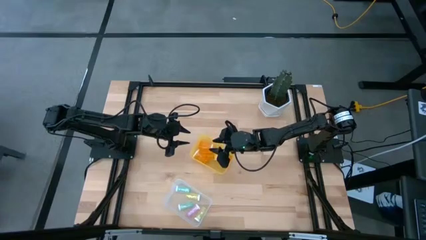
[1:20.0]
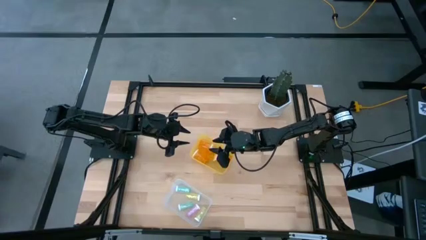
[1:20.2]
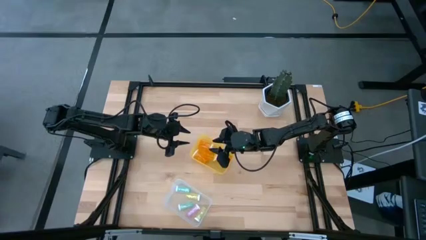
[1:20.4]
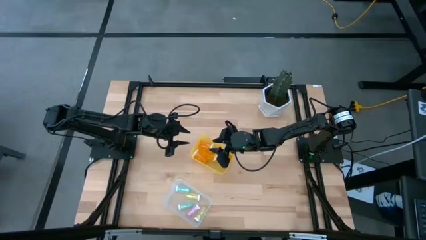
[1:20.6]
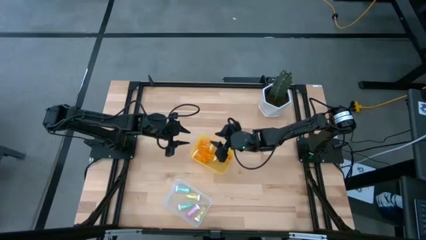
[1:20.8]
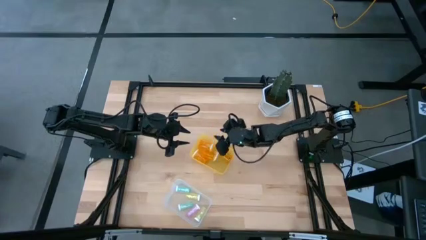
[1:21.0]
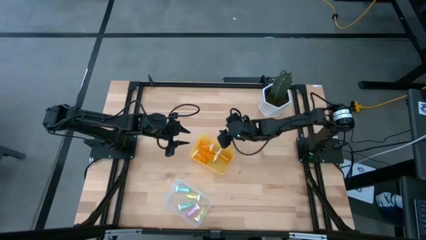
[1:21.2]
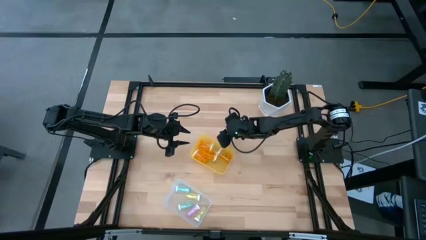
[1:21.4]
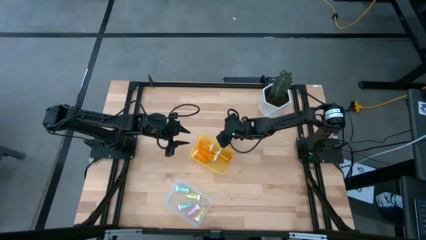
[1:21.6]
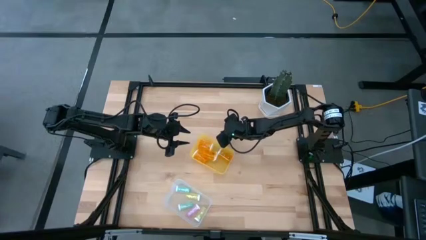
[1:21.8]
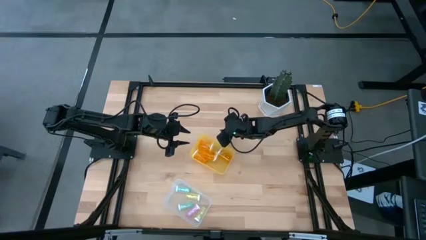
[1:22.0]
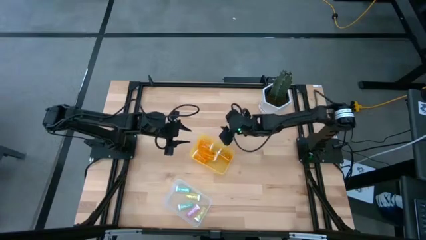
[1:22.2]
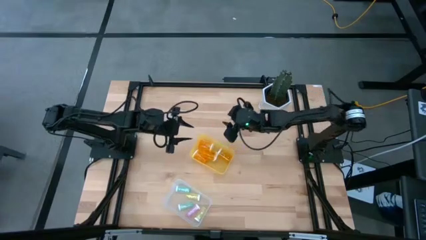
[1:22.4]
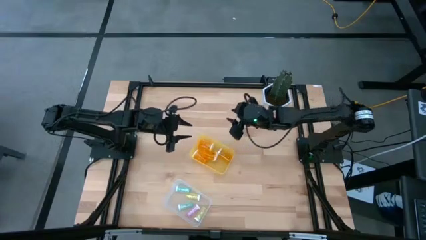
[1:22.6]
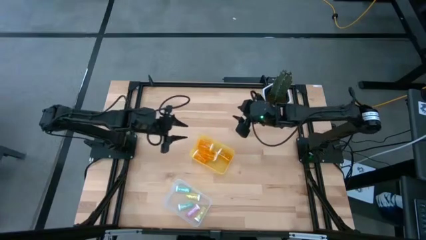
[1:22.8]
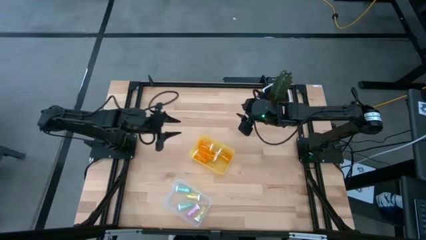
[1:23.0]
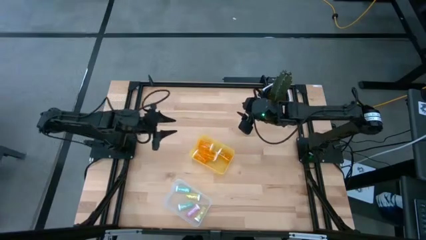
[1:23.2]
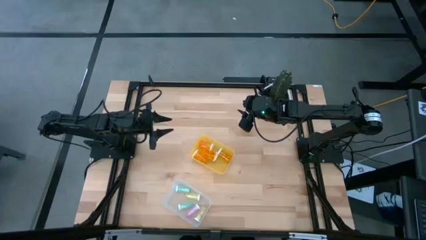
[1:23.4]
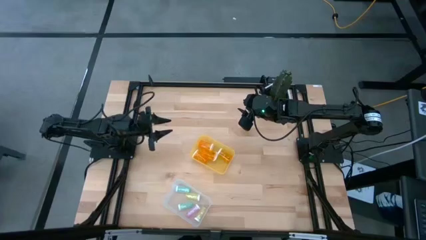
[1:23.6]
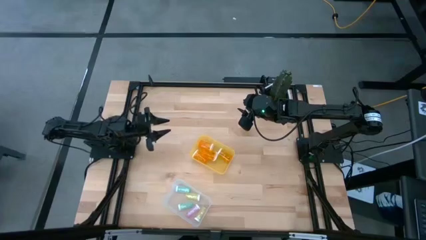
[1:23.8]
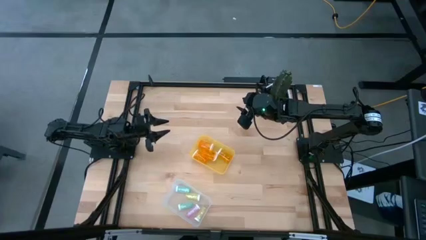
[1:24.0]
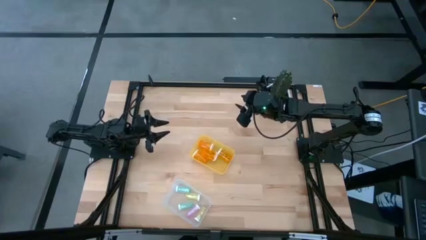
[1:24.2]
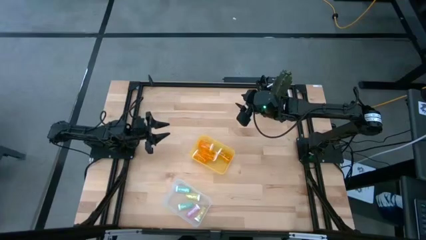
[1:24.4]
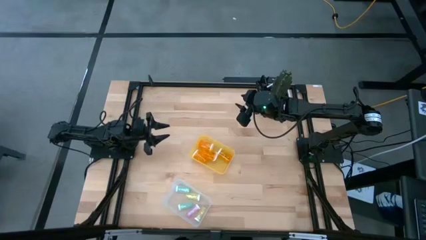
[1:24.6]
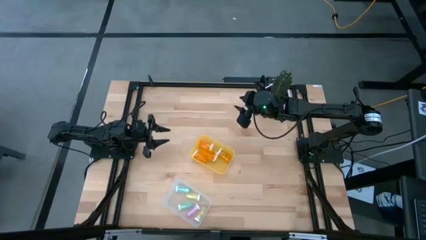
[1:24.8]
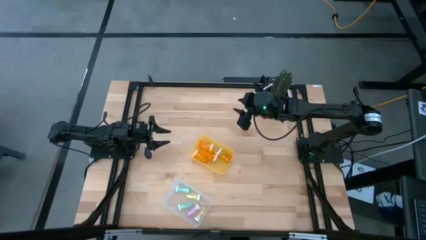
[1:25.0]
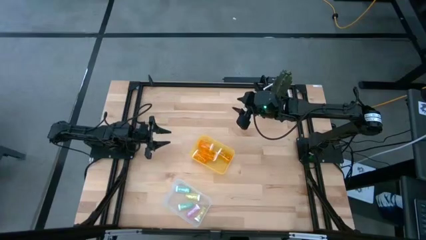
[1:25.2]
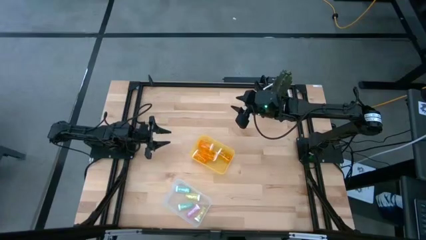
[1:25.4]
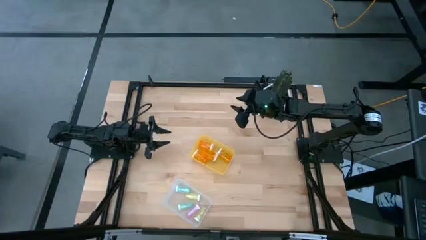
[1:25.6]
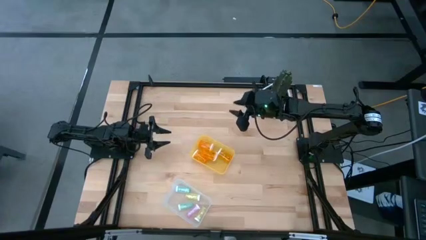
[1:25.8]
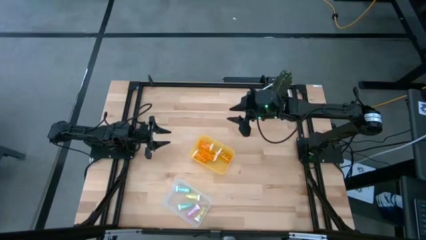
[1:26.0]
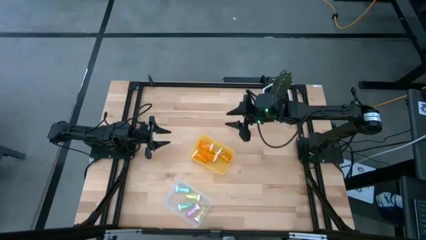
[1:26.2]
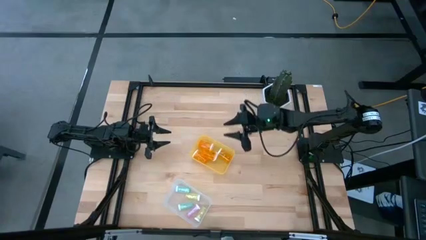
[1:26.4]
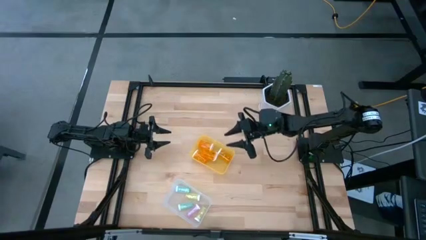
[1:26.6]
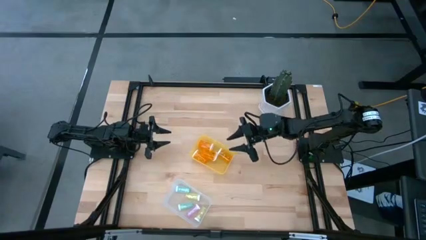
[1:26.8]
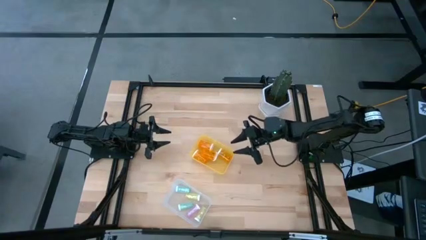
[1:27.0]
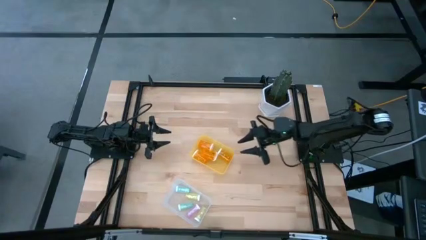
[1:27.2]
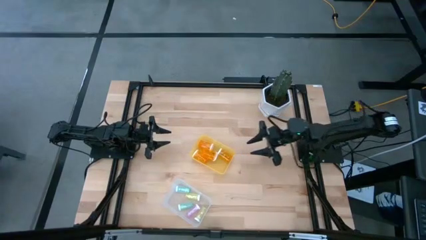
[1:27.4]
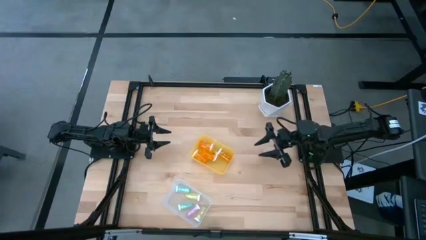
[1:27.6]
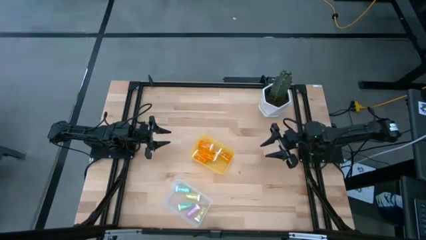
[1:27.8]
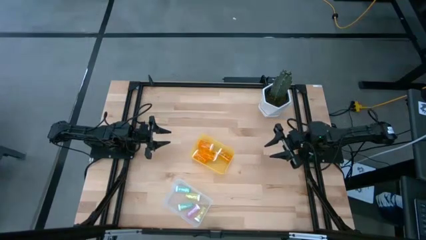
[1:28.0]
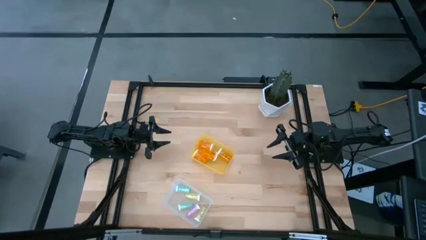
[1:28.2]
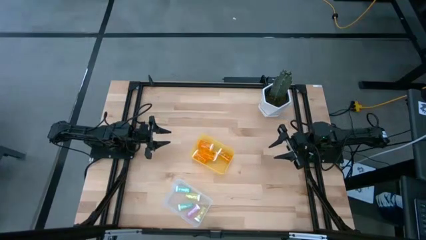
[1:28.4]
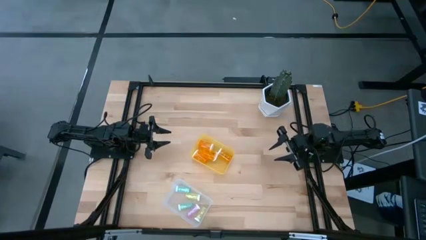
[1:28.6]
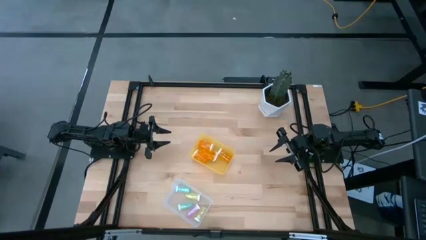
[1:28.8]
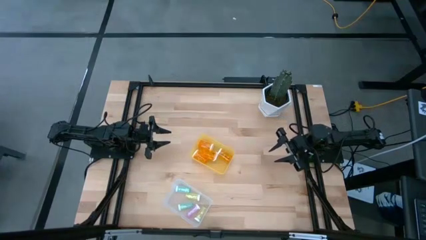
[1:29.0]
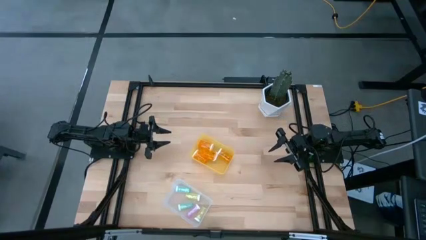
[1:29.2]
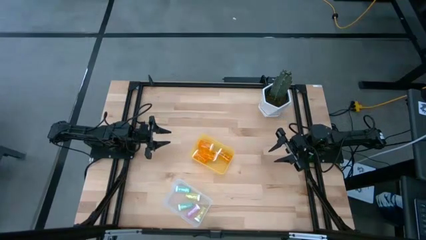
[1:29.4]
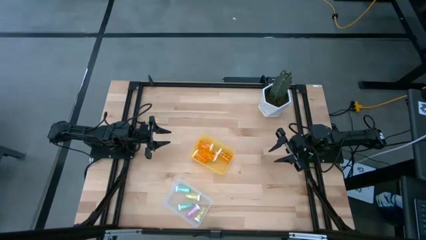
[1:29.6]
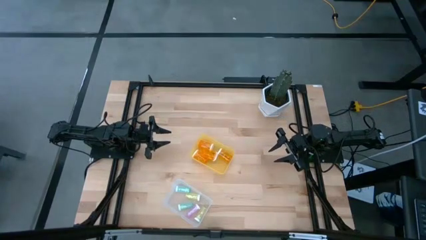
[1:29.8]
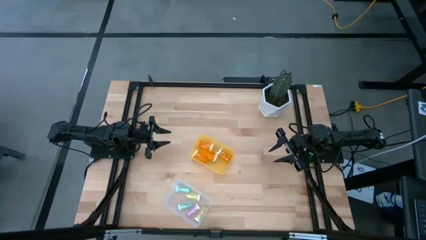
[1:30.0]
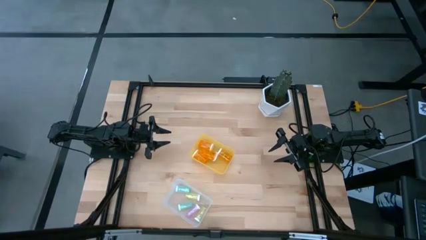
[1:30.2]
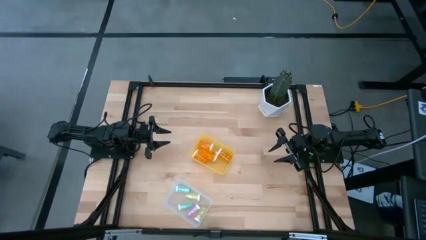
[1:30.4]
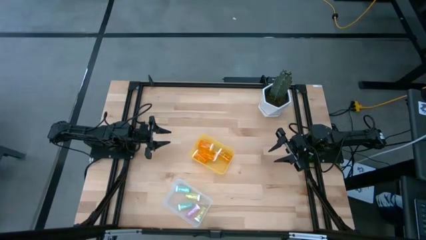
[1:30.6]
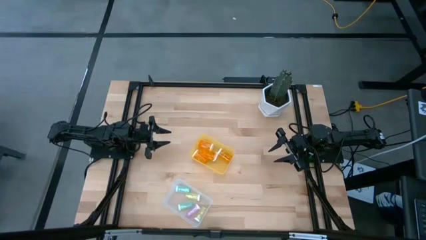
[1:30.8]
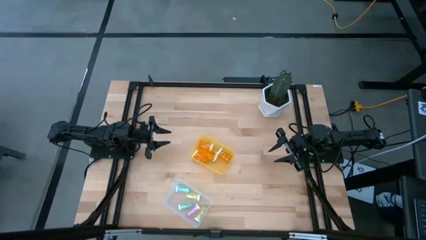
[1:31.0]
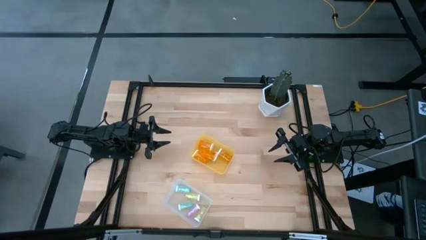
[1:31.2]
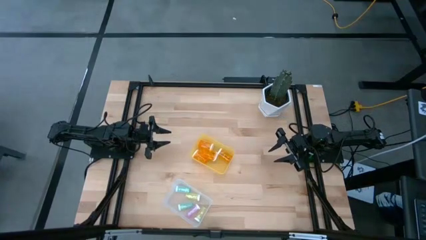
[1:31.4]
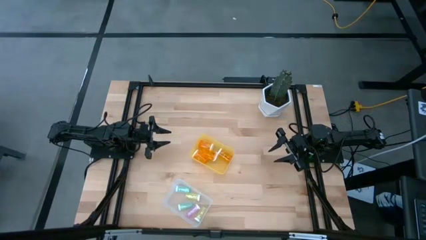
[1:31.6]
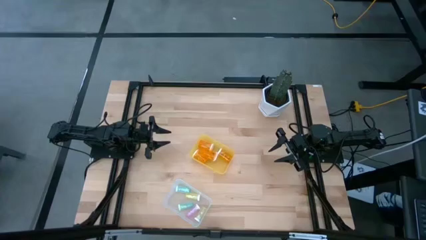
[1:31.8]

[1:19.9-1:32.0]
Task: Pick and place medicine bottles into bin by pill shape (circle, oval)
Return to Home Position

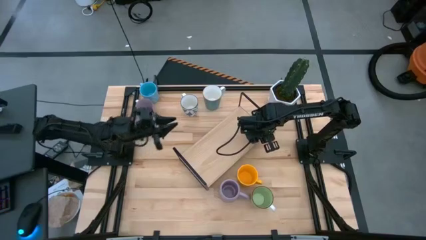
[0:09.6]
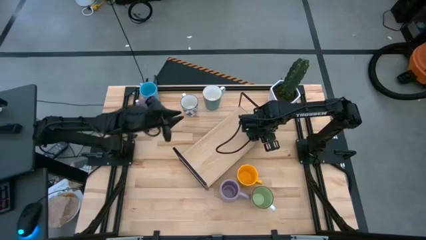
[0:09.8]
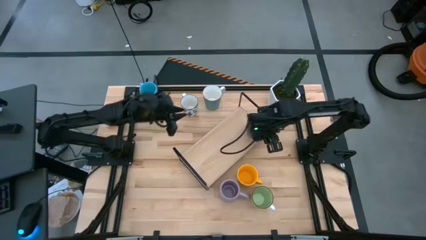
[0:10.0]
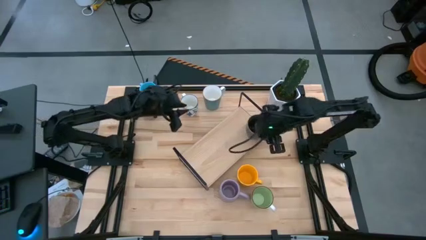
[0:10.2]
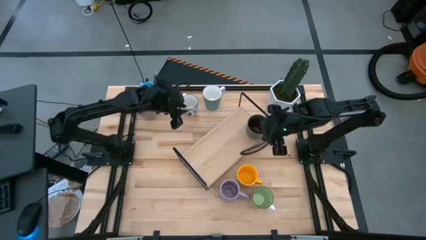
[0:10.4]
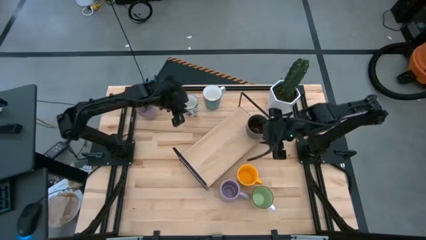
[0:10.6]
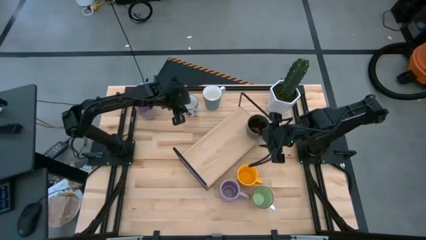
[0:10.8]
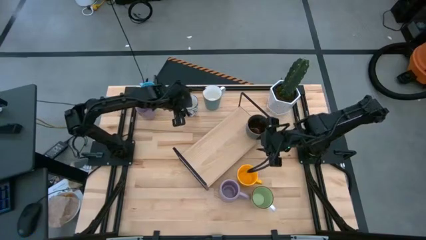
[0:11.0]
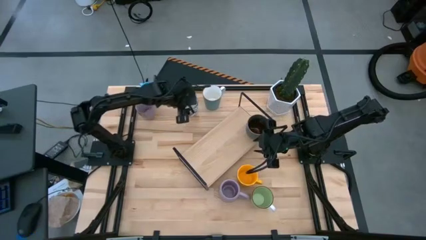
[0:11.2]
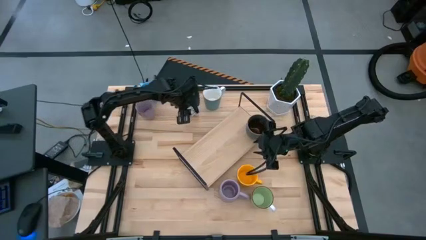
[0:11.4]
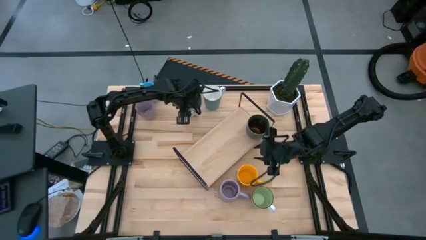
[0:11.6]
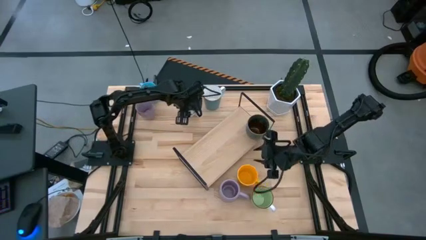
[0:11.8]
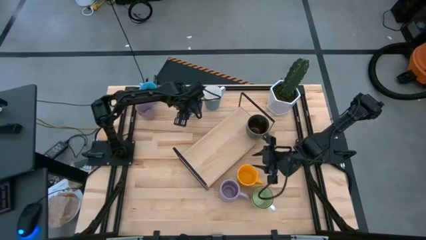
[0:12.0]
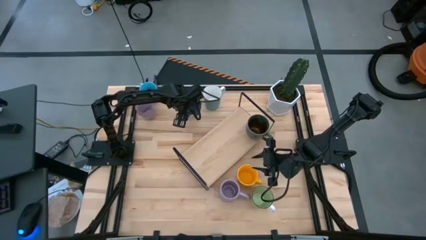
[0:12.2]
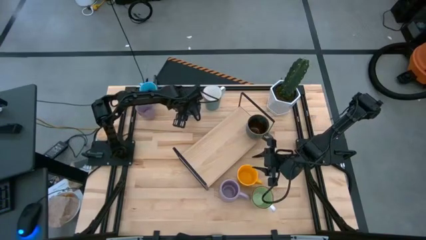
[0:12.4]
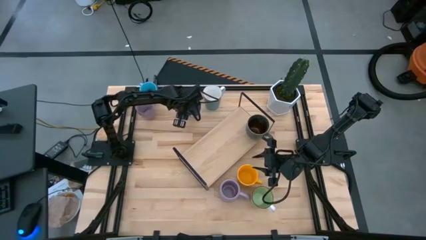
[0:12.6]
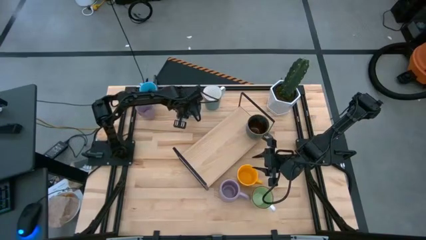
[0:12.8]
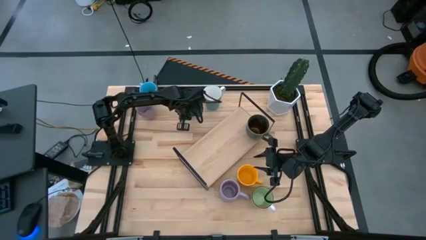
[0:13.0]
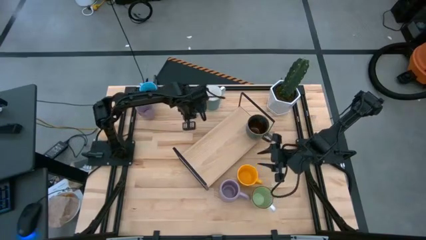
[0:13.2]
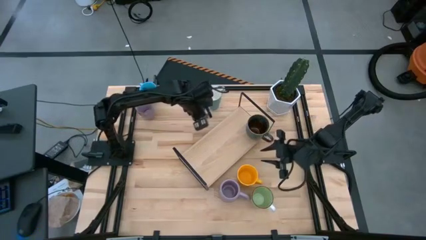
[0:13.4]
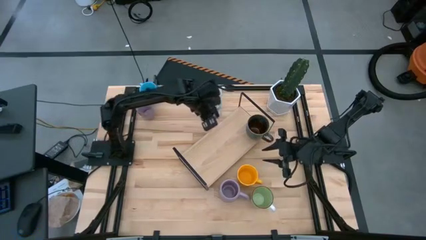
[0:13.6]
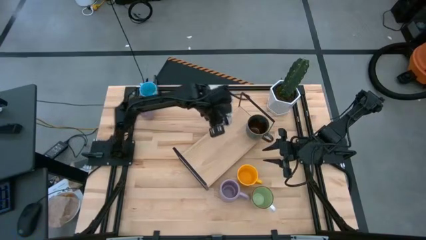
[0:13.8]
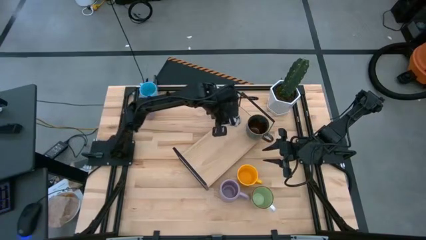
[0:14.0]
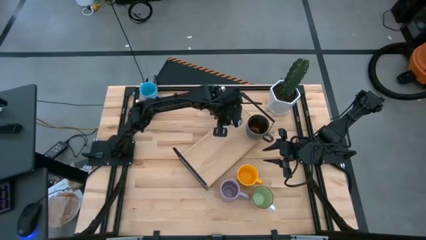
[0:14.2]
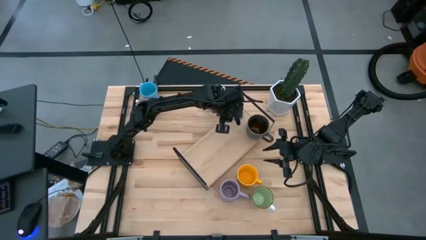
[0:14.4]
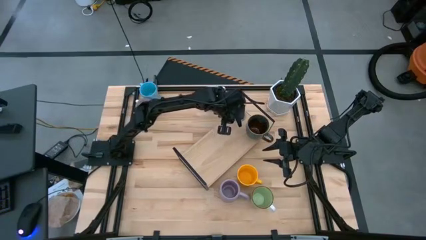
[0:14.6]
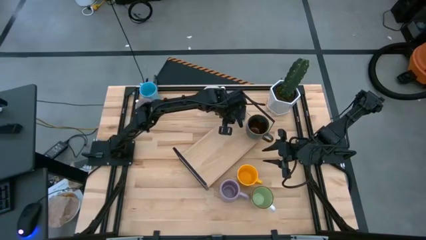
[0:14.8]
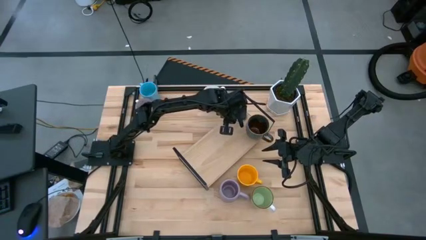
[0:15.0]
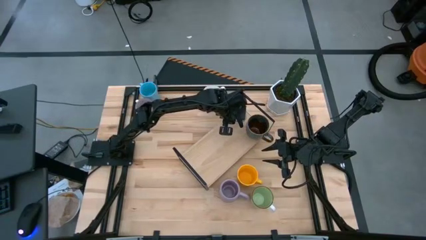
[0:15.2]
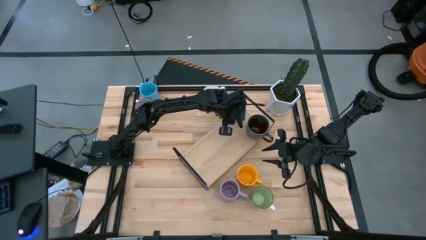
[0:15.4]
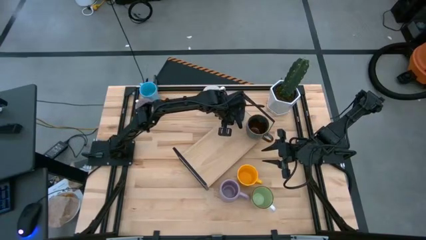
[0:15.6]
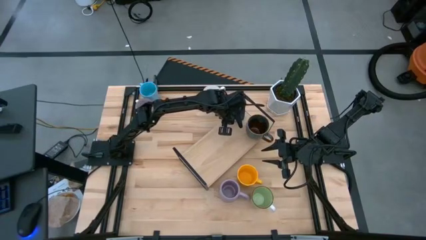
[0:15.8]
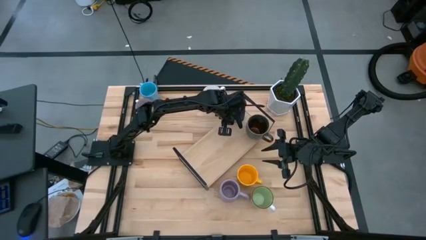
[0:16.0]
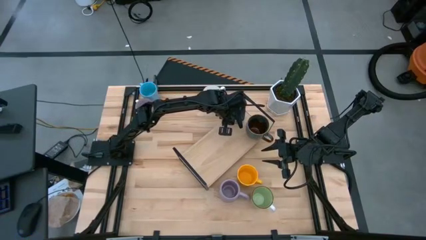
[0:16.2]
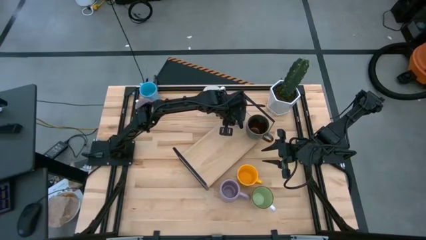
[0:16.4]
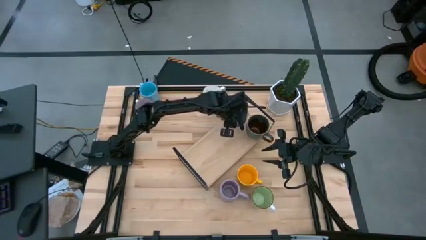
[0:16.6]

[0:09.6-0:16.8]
Task: Place coffee mugs
Put the light blue patterned mug on the shelf
